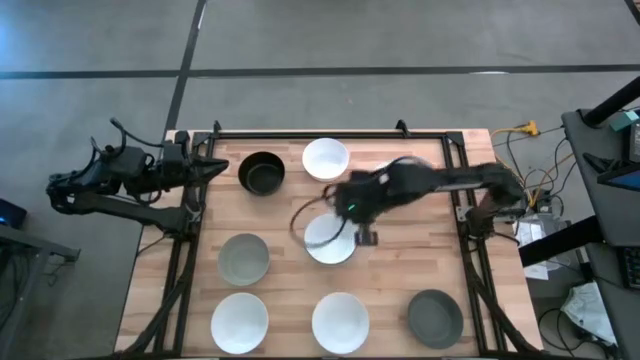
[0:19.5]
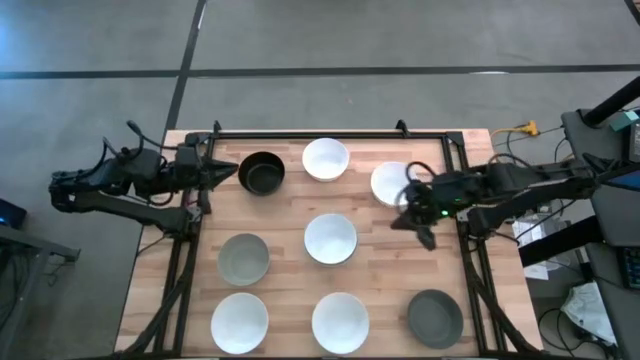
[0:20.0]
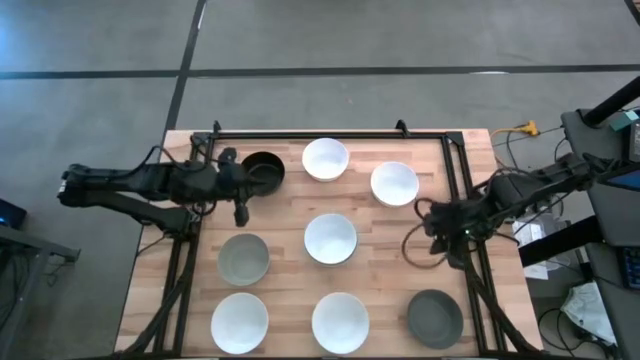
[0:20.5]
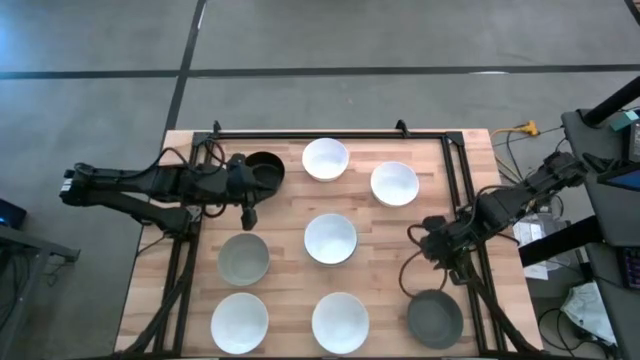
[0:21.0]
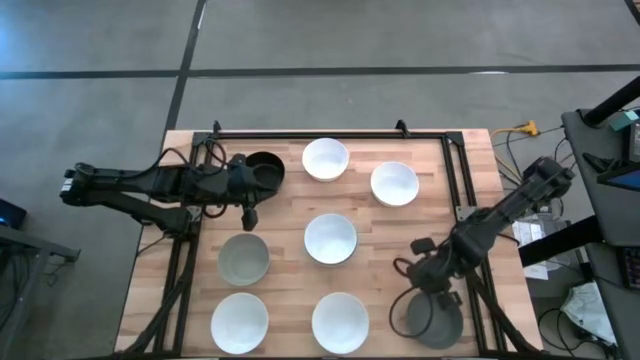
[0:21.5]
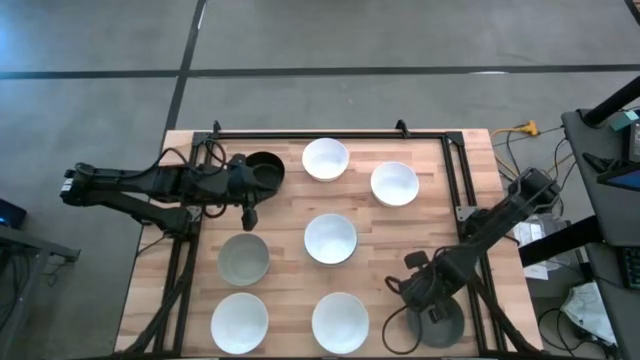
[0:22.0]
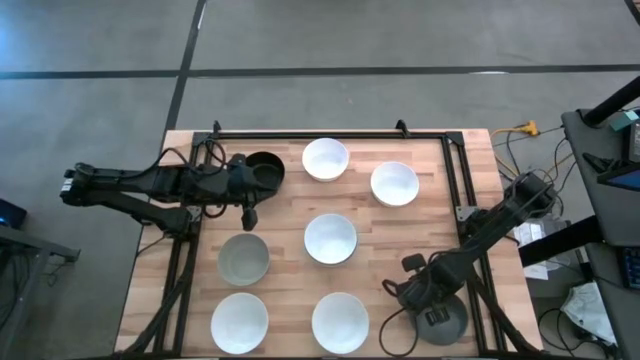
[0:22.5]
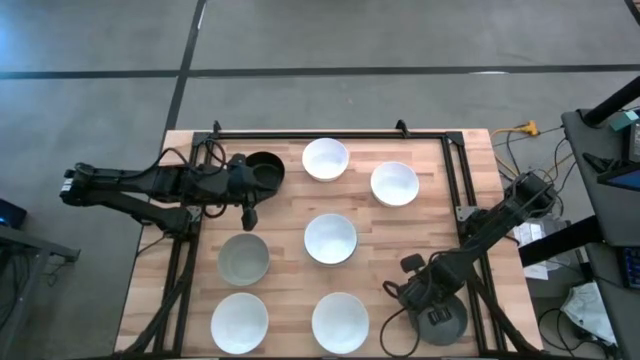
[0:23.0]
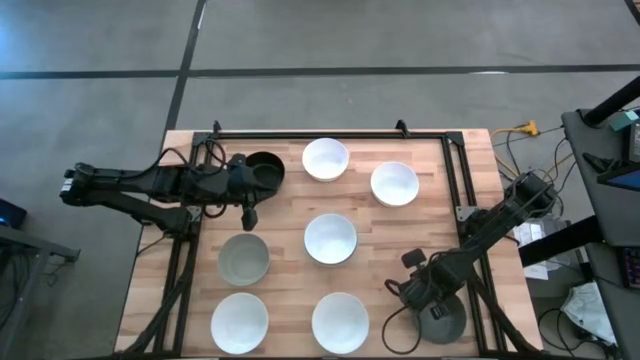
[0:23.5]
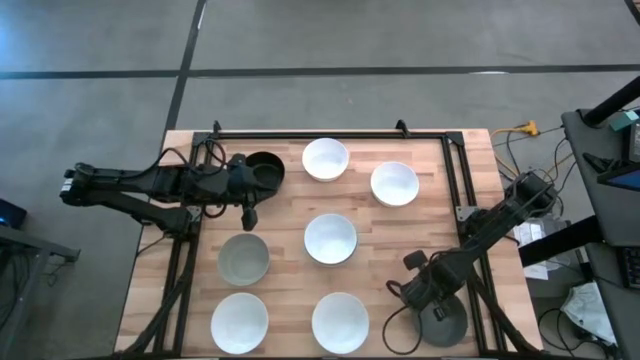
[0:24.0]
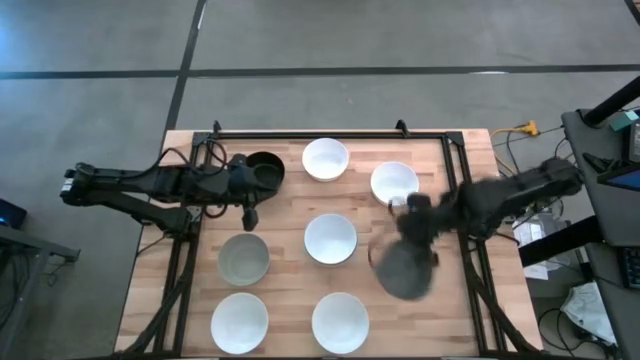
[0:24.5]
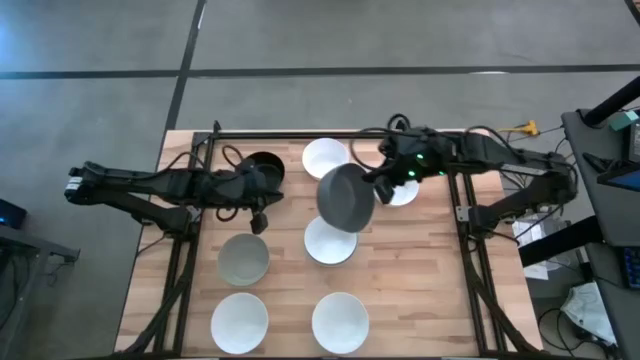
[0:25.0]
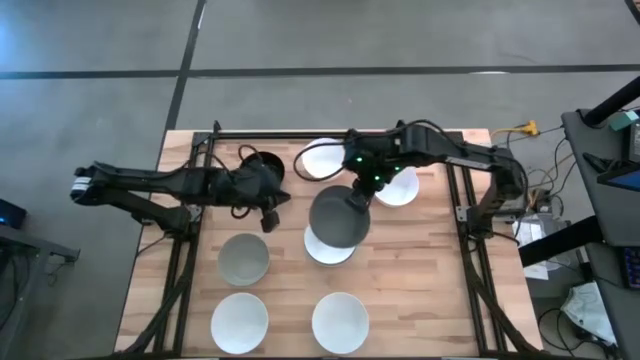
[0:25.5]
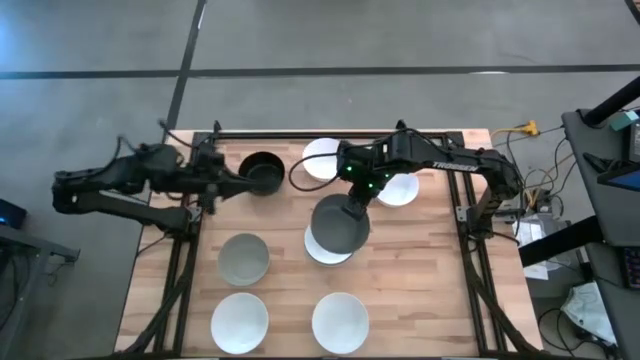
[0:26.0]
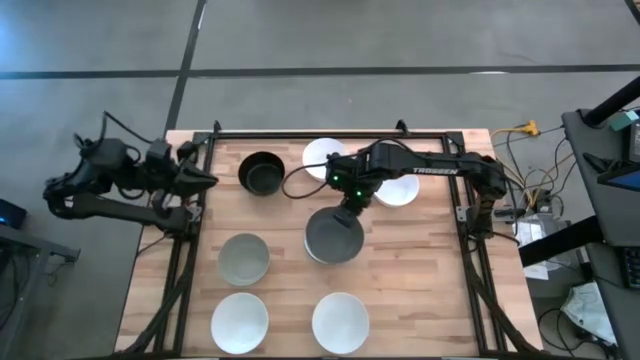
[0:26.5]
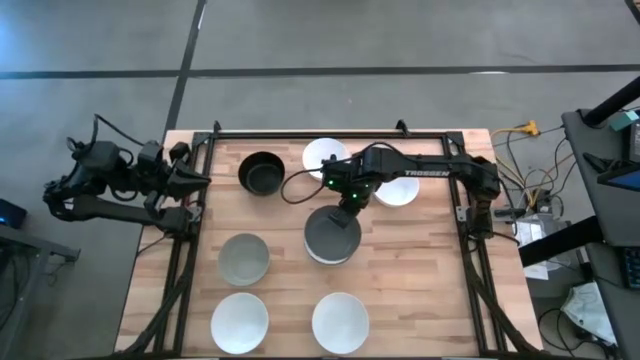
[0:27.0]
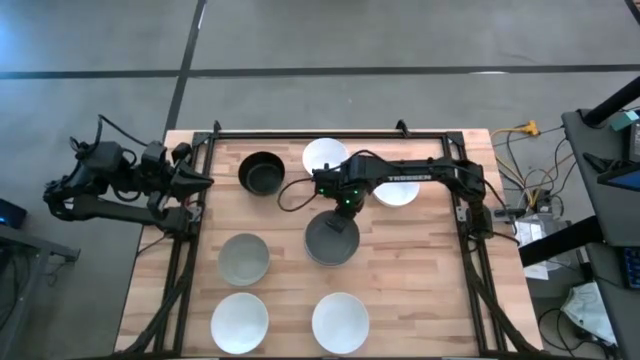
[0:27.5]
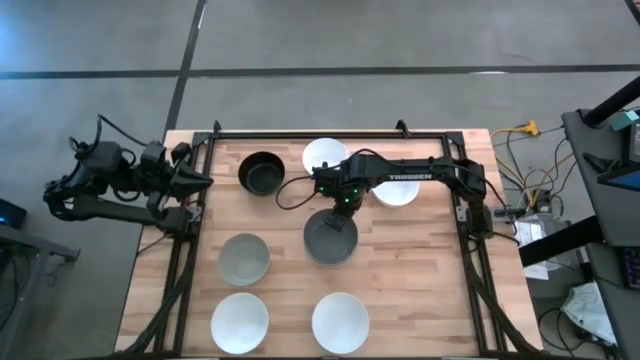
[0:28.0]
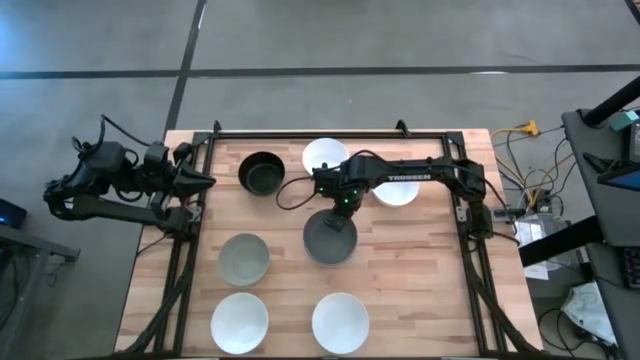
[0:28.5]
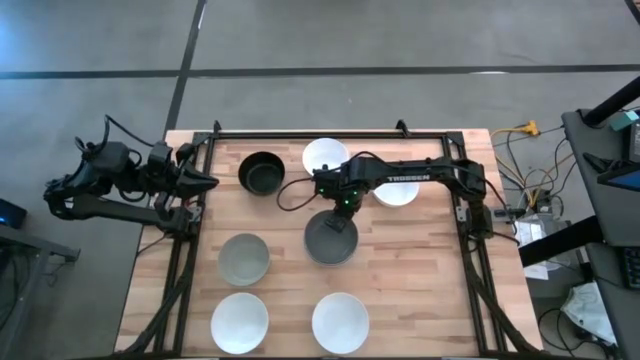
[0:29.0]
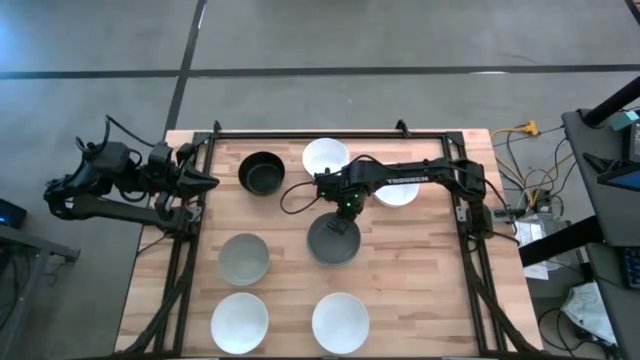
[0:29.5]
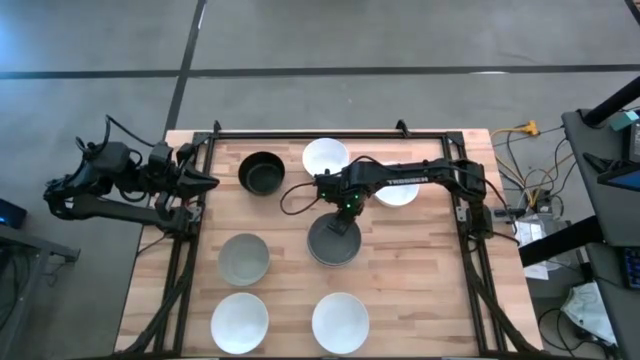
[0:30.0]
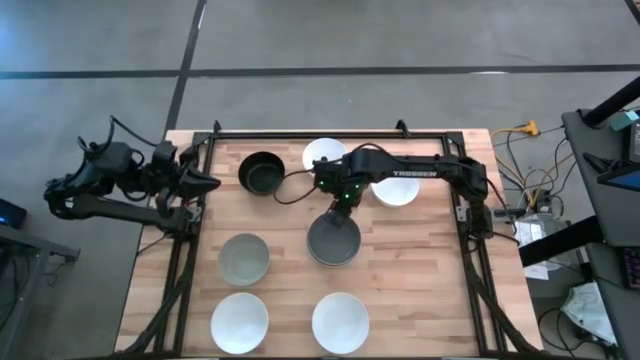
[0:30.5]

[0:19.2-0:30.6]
Task: Nest bowls inside each other
Stack the dark gray bowl on the top of the white bowl

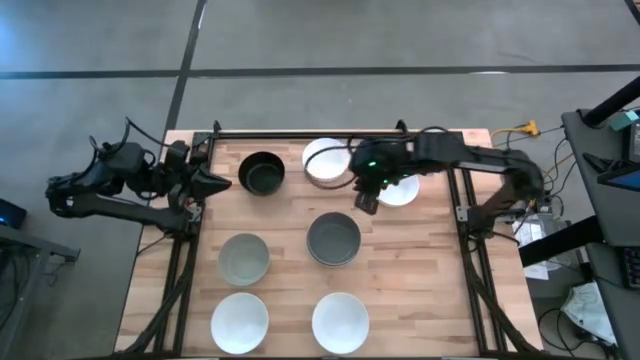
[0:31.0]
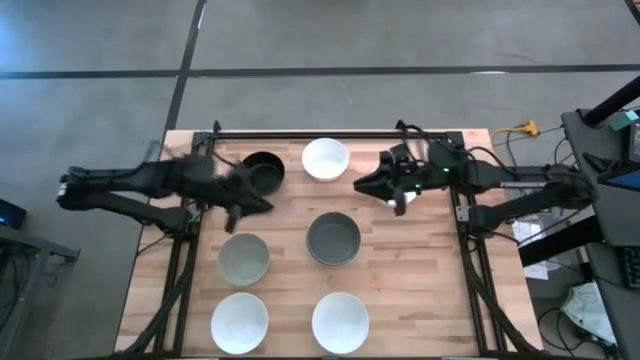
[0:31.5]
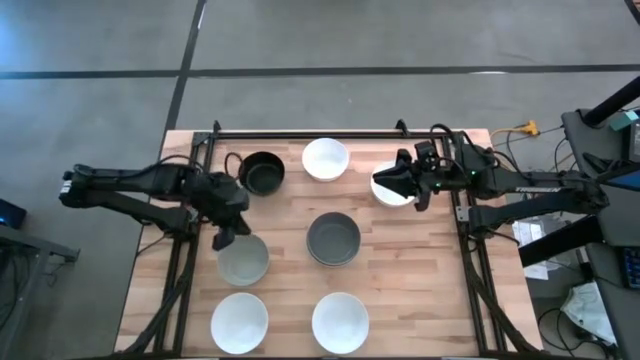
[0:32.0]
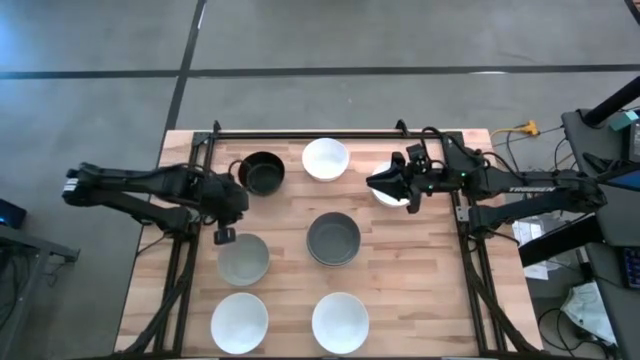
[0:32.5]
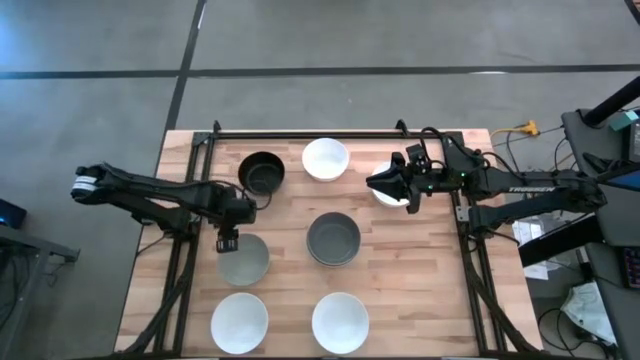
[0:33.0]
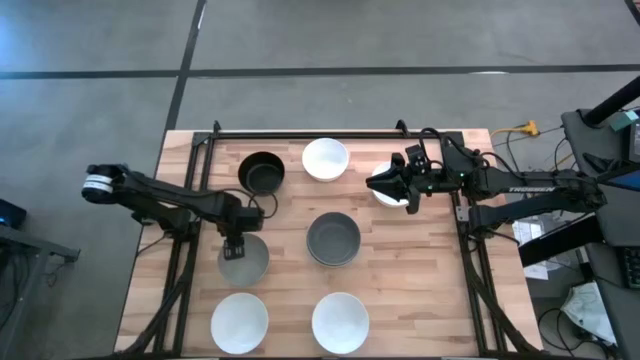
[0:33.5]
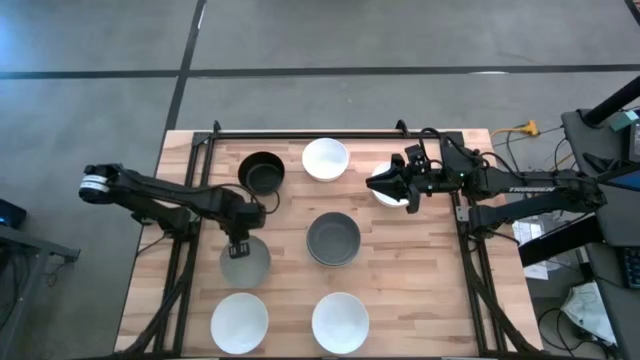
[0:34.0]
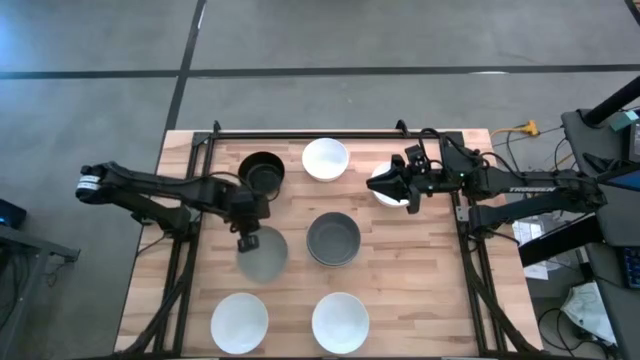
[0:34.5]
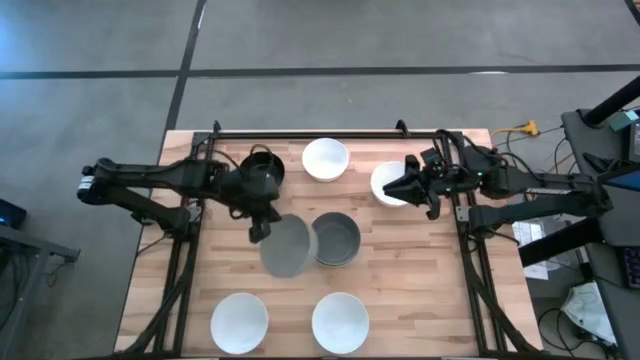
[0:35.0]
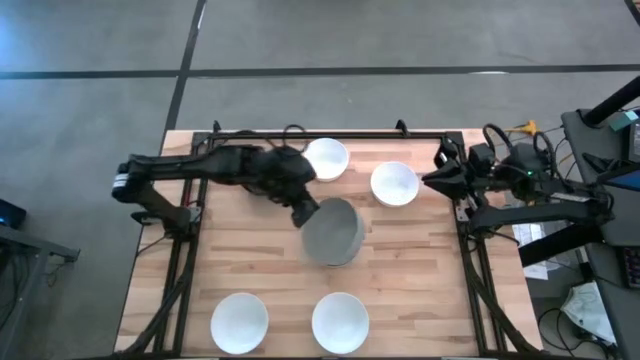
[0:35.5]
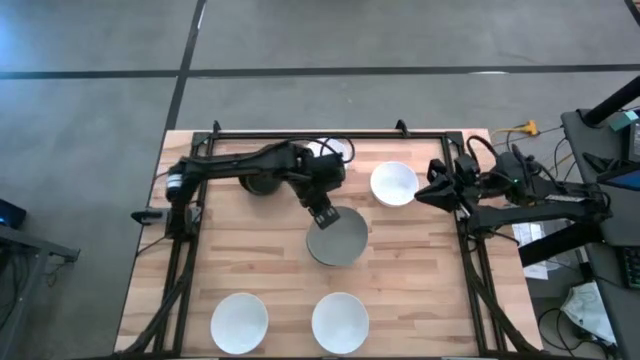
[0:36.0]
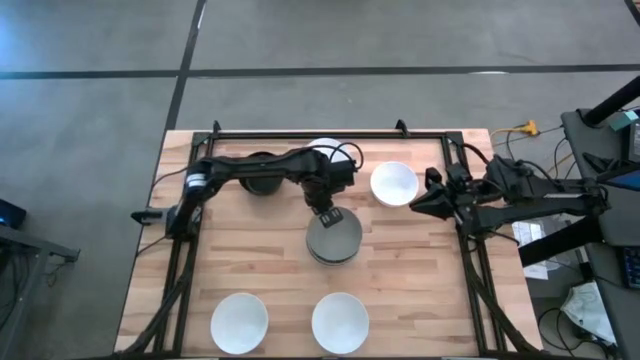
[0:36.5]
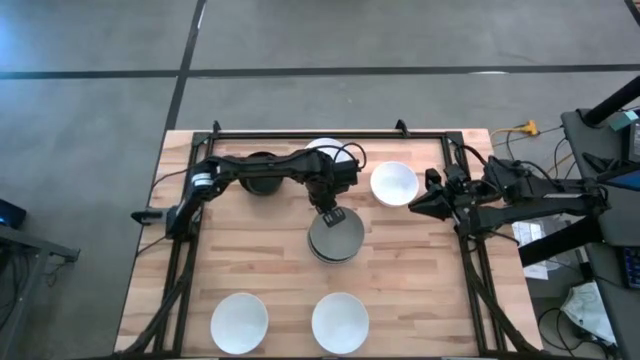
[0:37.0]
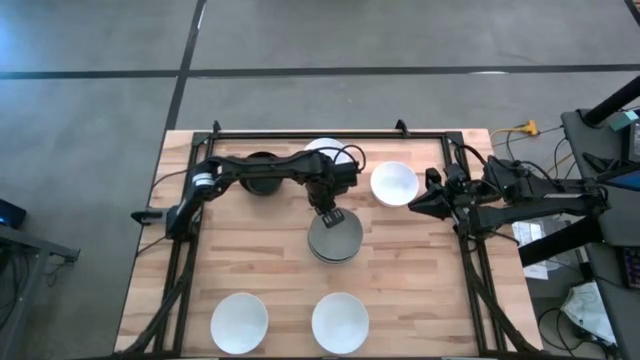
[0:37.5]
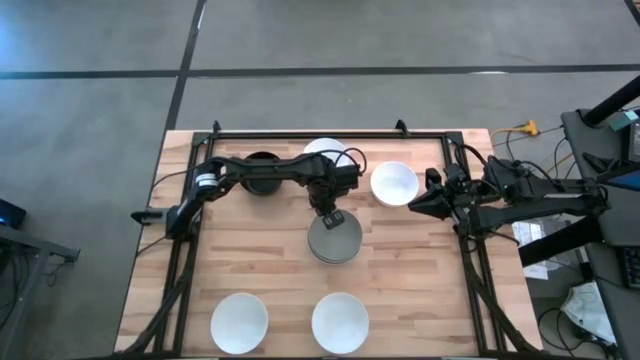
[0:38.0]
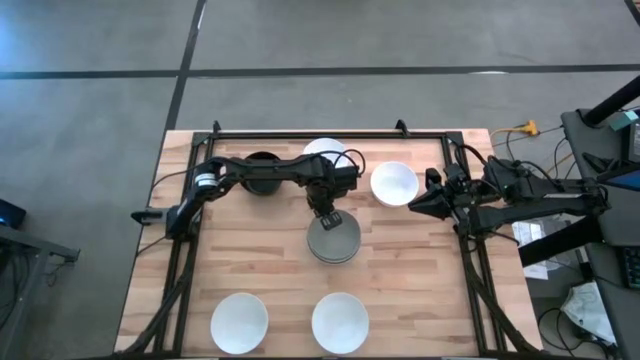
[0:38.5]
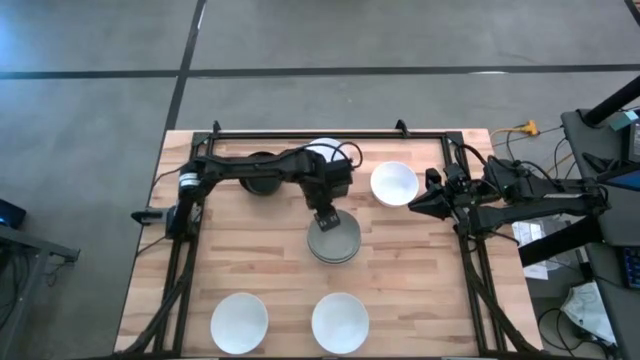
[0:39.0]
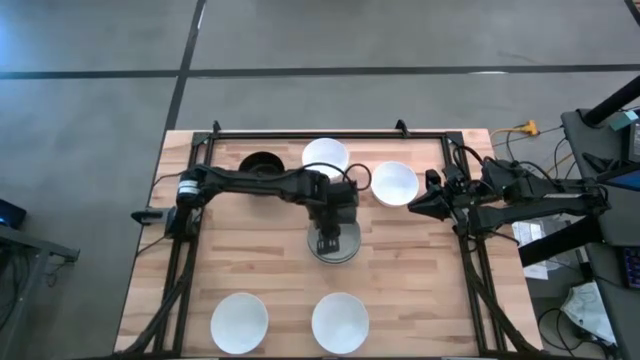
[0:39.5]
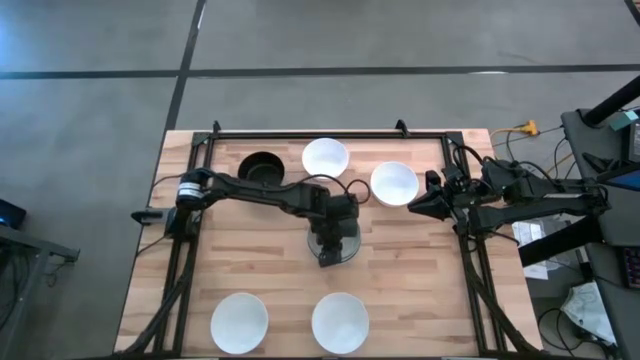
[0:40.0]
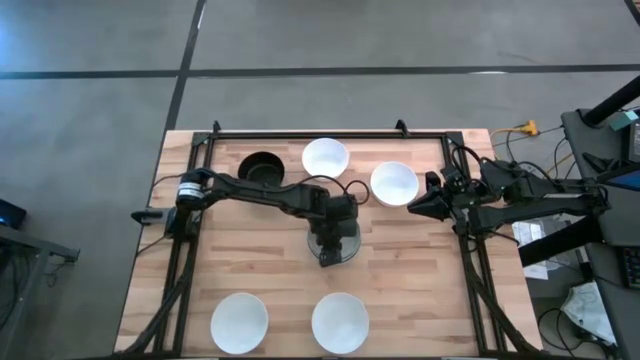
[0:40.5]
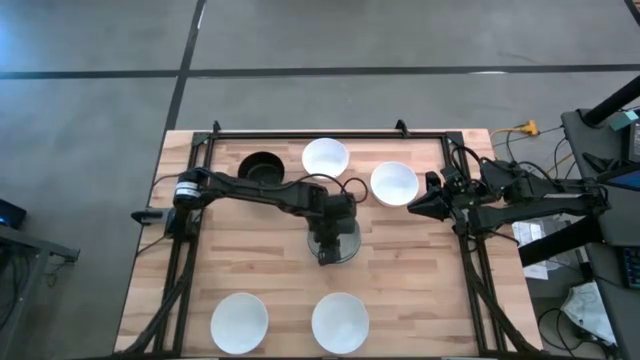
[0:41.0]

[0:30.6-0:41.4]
Stack the gray bowl into the top of the dark gray bowl
